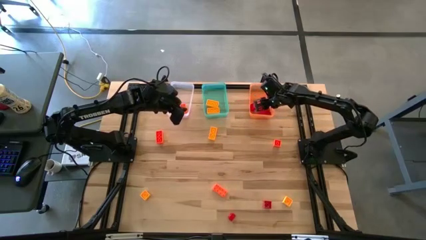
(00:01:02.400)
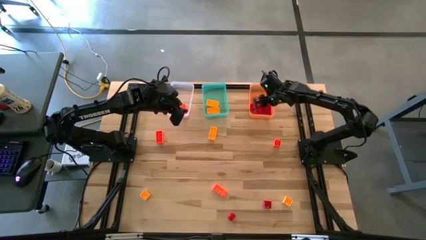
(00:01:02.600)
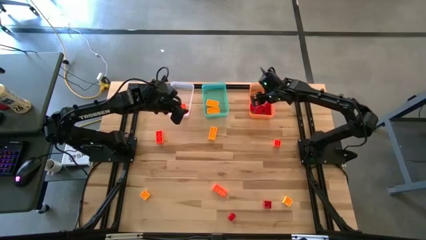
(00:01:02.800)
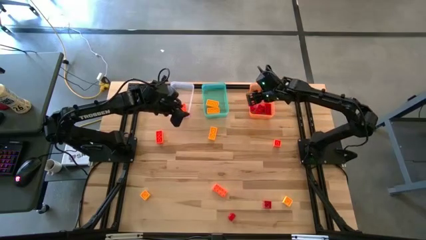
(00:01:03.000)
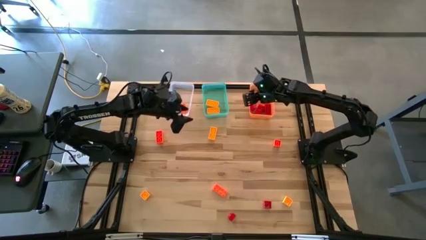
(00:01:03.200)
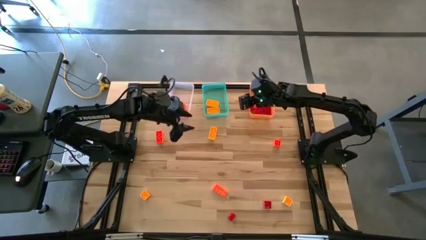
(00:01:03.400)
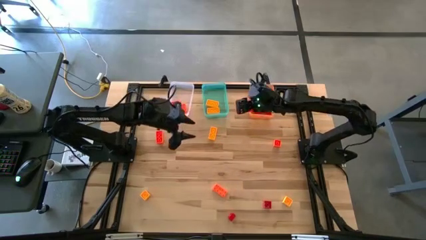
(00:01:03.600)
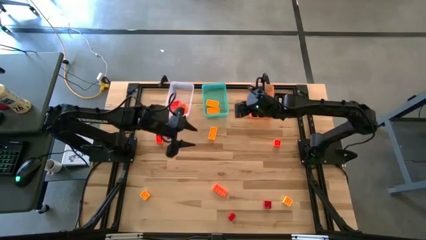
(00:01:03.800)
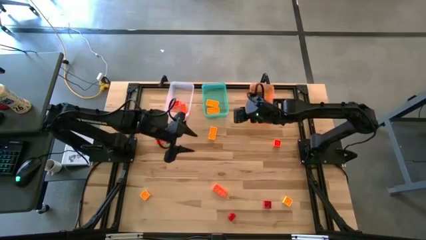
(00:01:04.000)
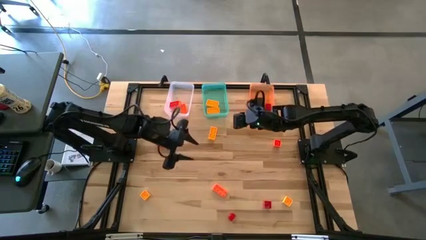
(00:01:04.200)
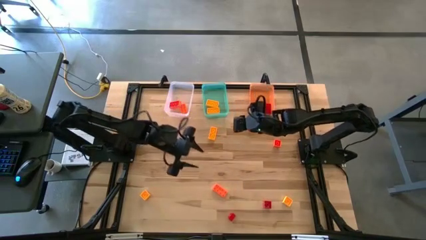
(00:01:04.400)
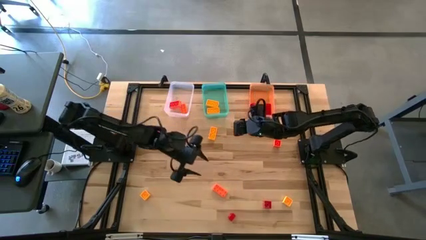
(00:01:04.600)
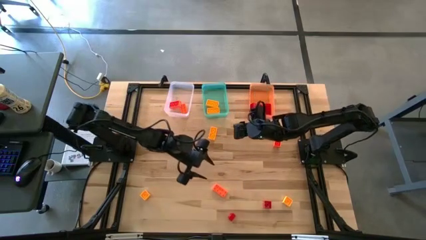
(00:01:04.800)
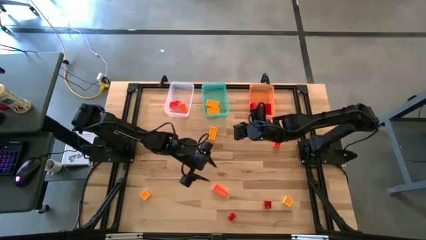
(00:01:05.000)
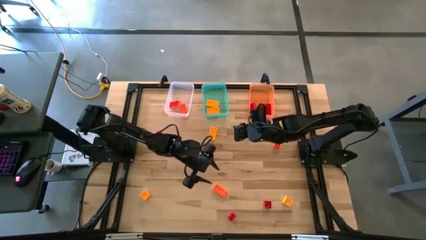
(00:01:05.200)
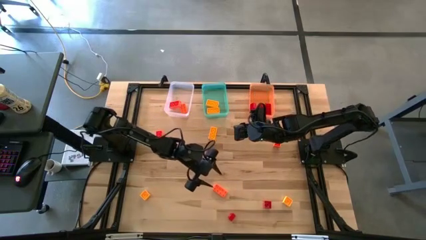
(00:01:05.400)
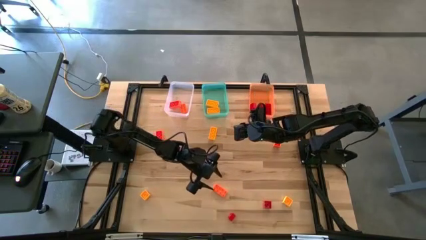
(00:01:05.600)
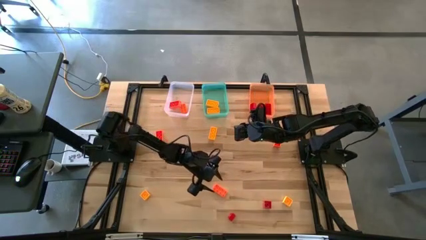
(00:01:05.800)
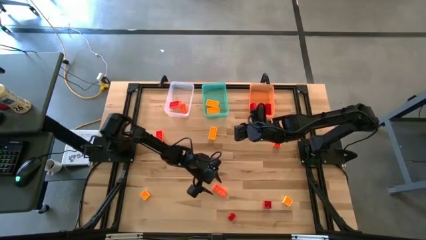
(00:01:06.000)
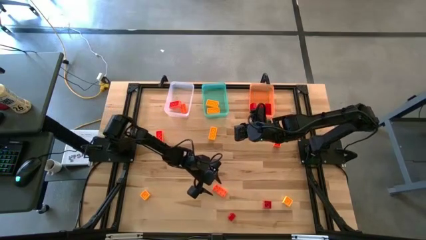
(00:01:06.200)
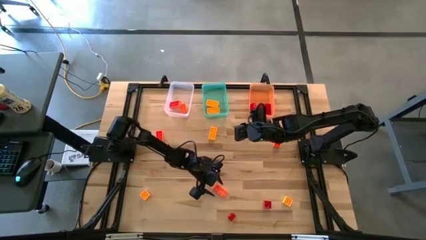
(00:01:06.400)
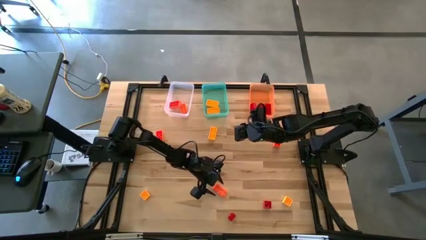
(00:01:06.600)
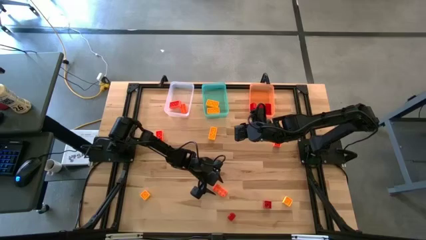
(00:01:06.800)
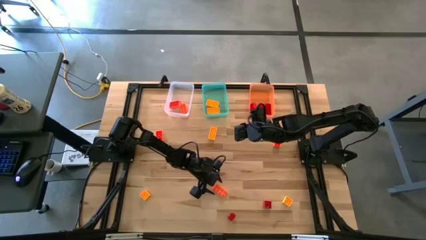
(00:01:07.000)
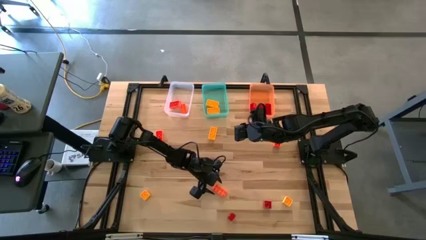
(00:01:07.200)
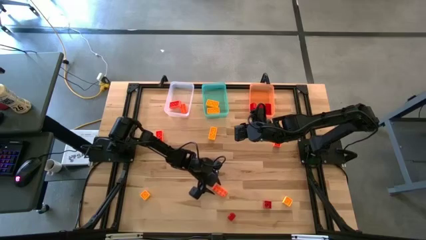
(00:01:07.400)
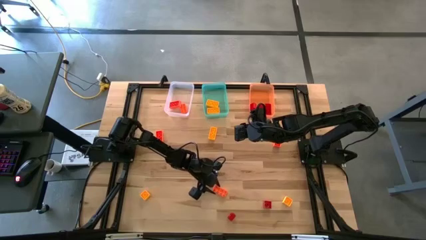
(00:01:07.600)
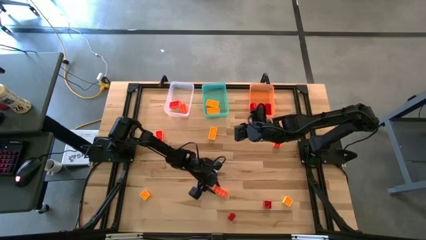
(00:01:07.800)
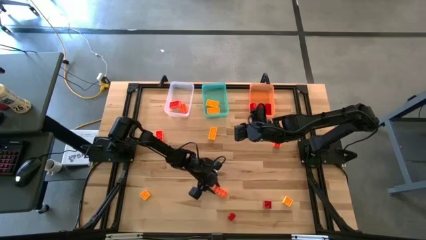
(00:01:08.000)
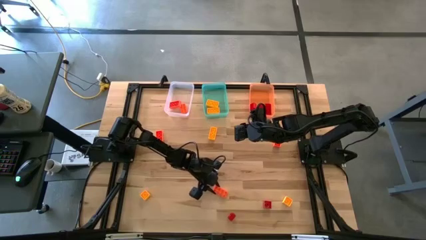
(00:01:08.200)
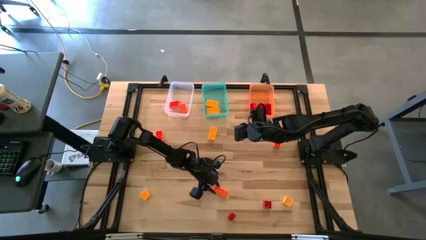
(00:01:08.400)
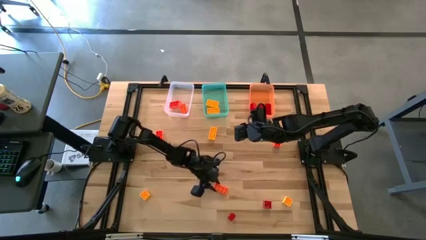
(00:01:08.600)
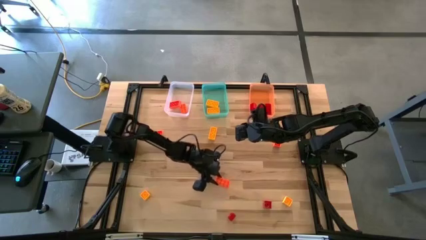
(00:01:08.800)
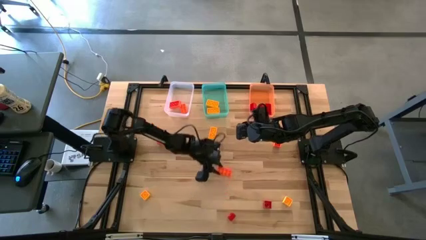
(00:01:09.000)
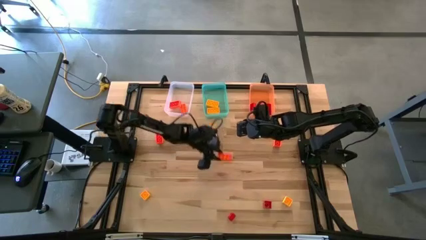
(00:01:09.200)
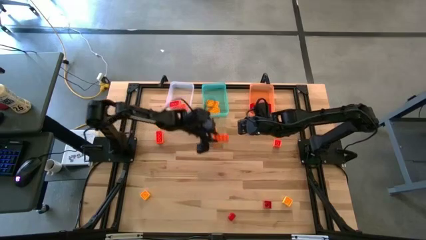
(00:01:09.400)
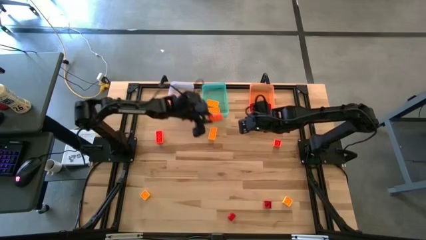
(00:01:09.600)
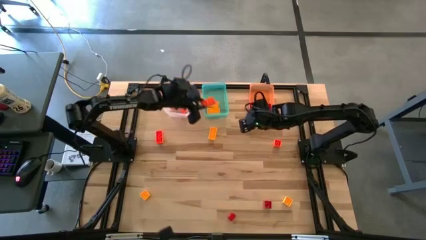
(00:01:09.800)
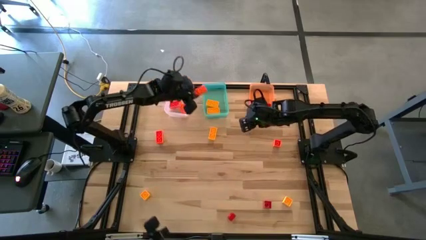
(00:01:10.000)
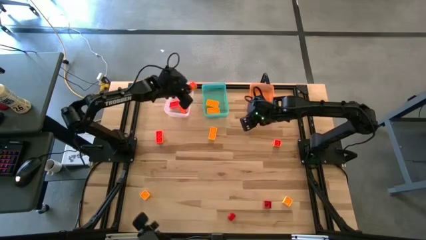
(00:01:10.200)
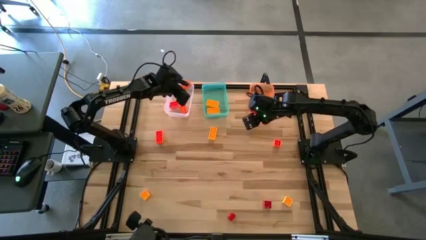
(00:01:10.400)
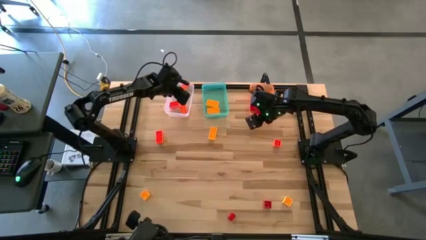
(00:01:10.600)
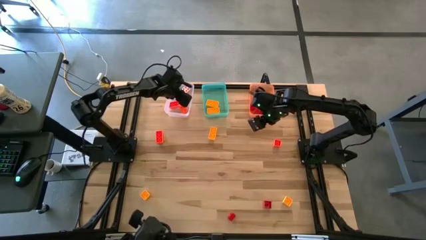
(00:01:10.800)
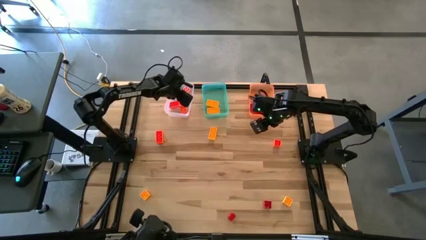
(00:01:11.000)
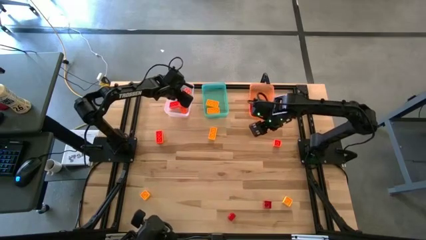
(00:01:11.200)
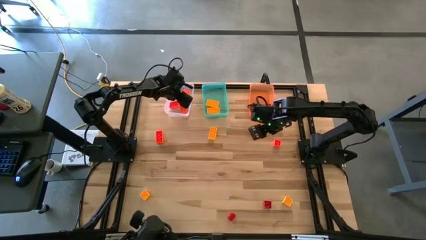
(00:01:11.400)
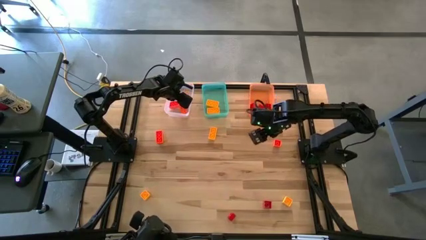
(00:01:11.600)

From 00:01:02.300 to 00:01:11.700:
Task: Sort & place blocks by color
Put the orange game piece into the transparent bin

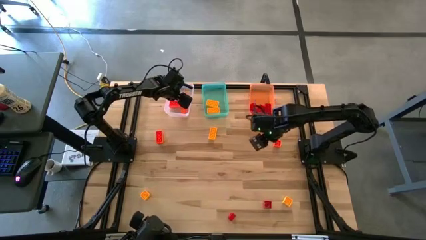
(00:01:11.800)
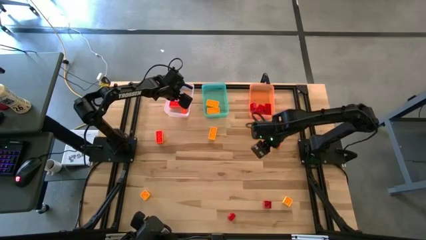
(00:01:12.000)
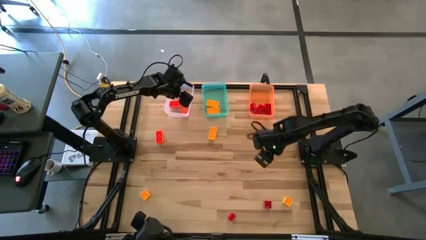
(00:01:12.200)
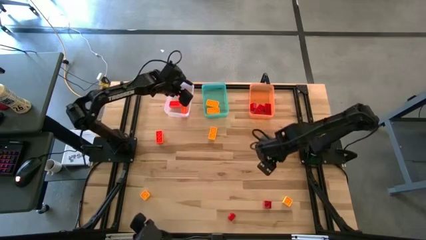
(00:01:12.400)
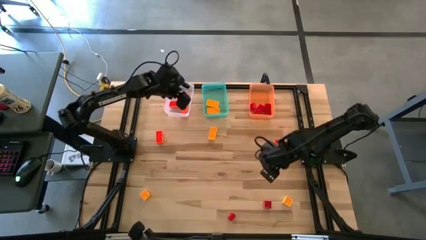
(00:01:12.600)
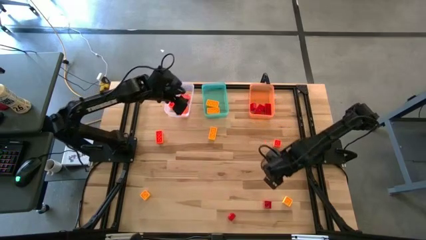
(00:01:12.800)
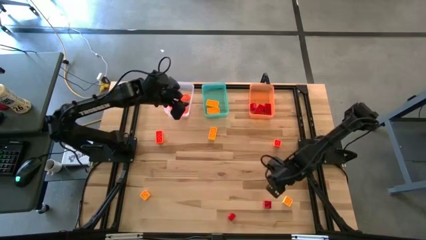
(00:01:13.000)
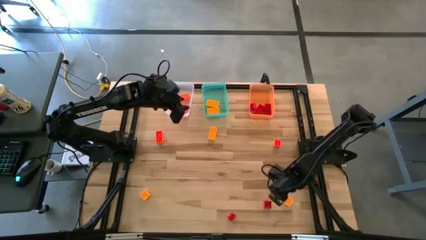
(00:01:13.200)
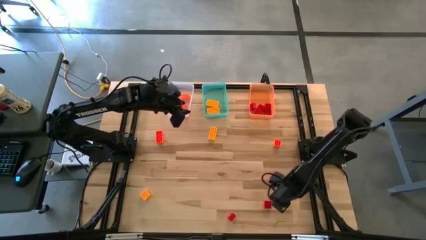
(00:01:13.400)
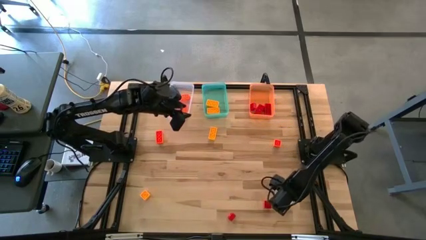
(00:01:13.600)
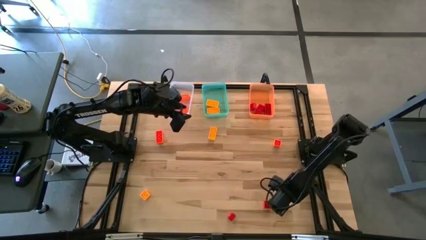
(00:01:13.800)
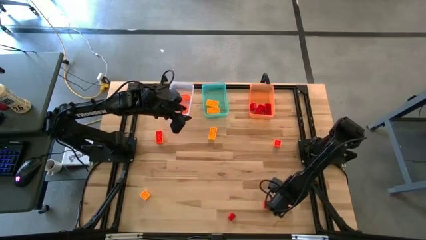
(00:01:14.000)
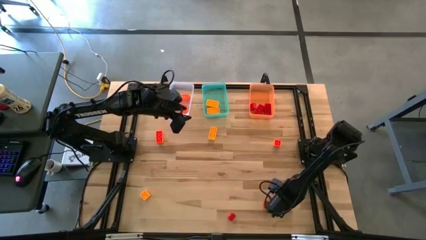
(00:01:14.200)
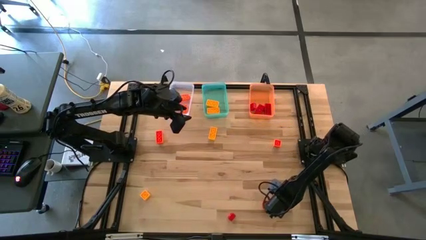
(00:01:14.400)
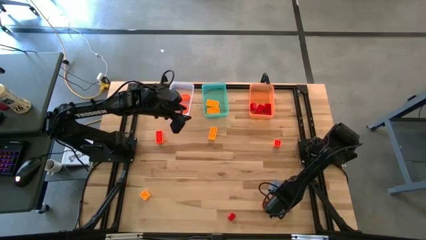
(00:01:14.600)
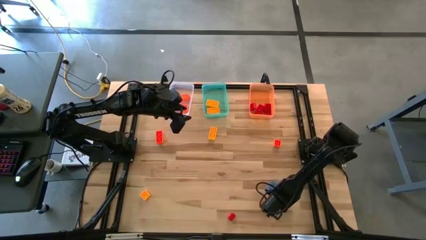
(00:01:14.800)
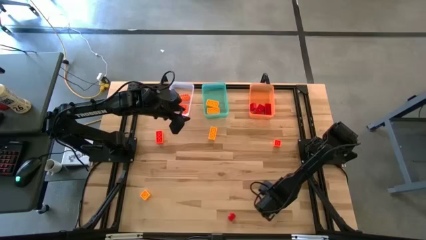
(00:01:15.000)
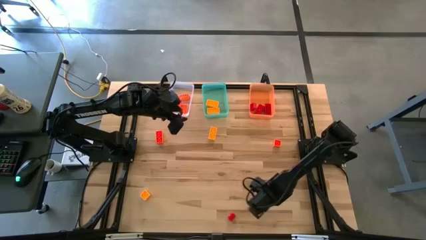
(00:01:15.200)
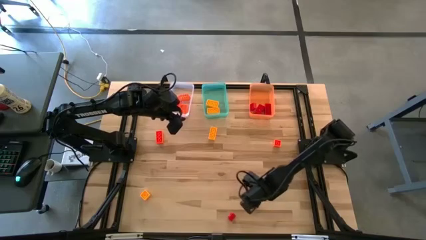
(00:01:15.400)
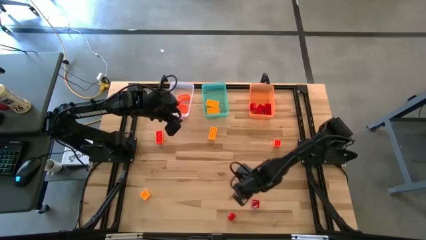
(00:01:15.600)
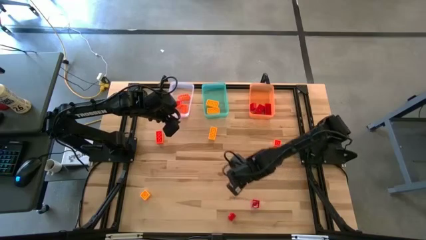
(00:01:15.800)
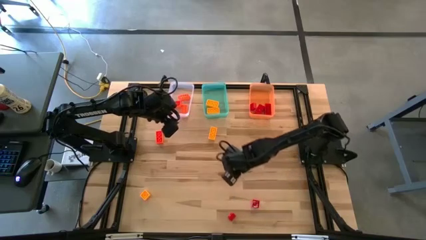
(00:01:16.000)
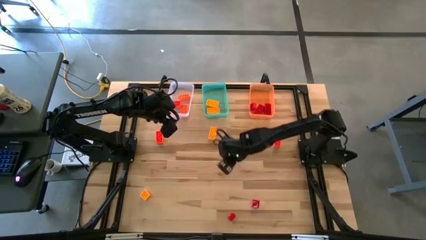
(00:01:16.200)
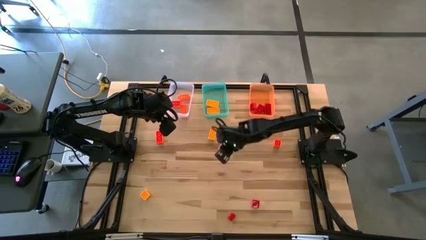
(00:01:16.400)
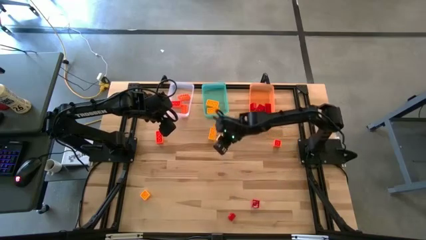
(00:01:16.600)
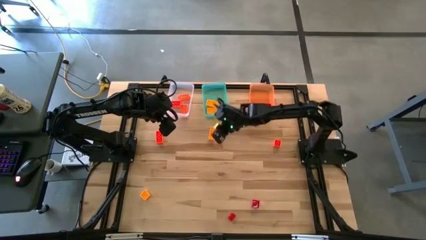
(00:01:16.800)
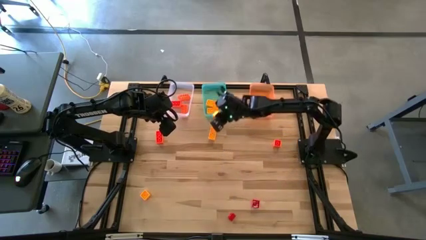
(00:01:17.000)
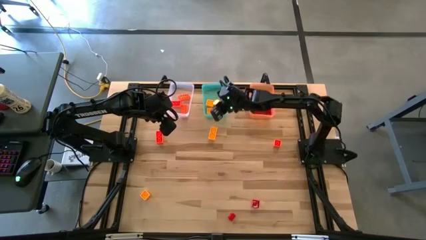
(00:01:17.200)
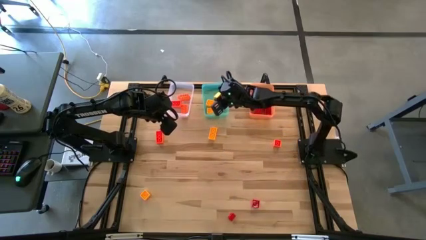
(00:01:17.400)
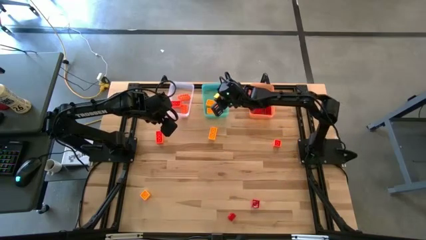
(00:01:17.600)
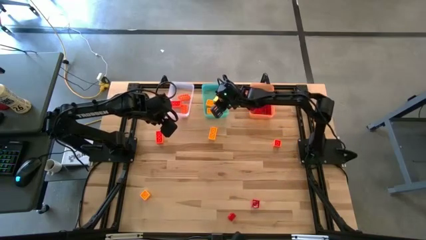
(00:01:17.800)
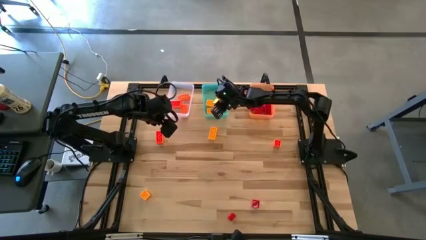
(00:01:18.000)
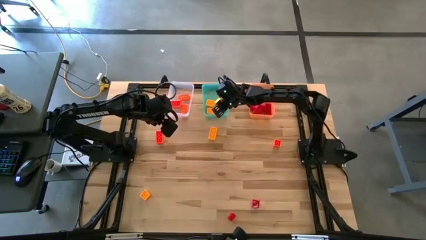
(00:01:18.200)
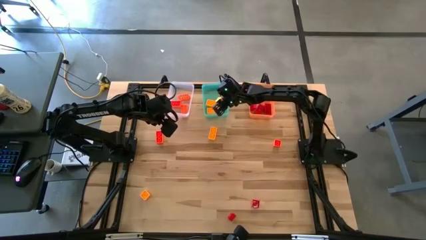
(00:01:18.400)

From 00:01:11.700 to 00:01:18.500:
Put the yellow game piece into the green bin
